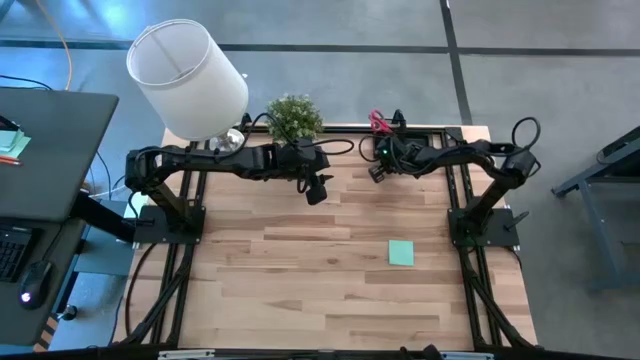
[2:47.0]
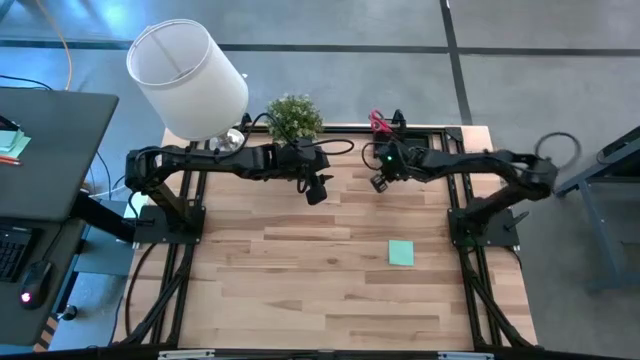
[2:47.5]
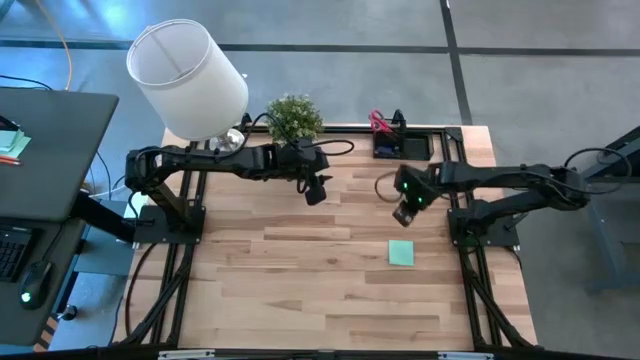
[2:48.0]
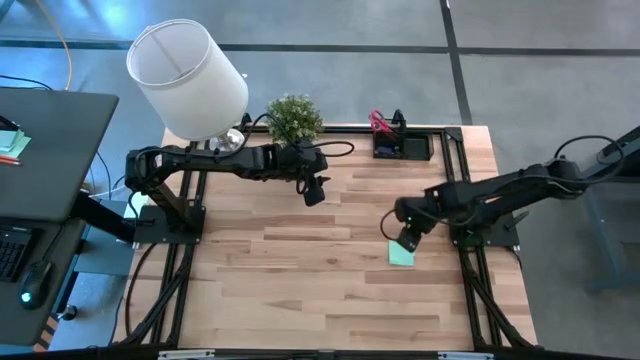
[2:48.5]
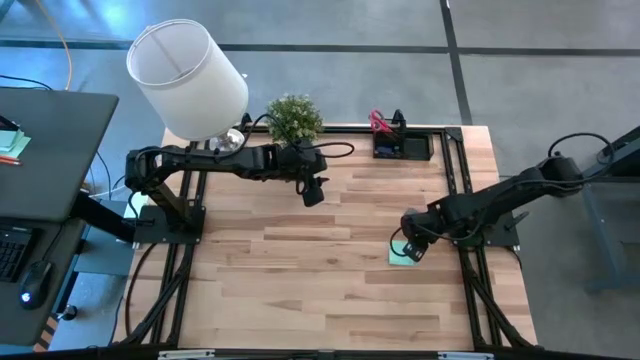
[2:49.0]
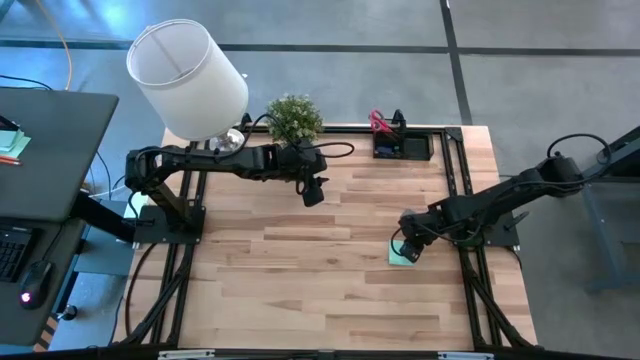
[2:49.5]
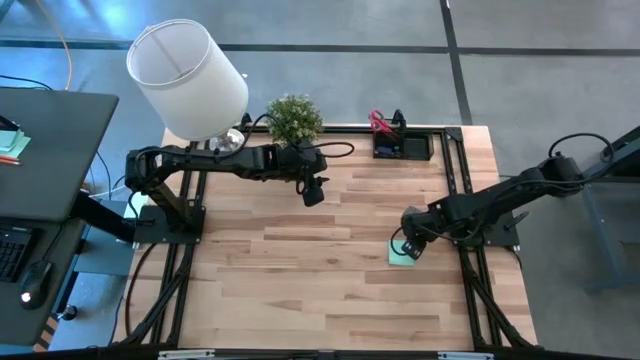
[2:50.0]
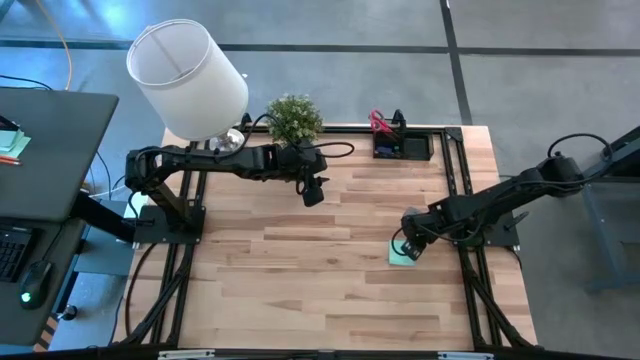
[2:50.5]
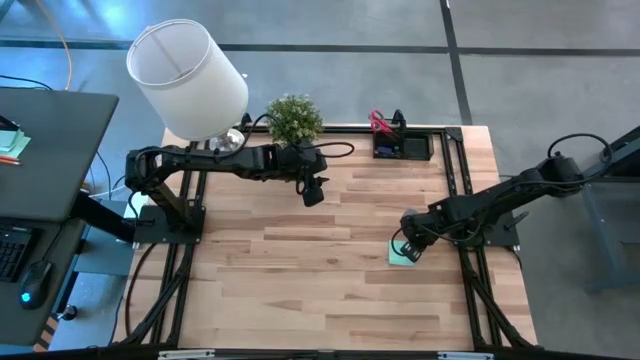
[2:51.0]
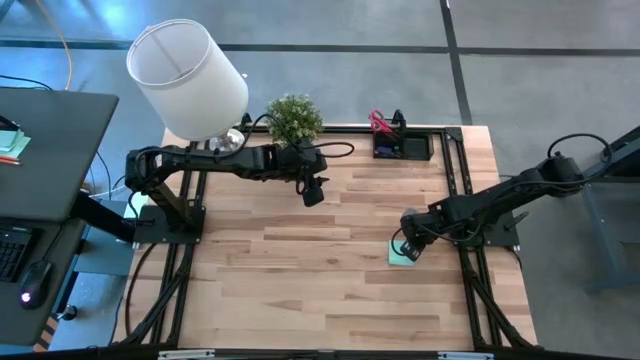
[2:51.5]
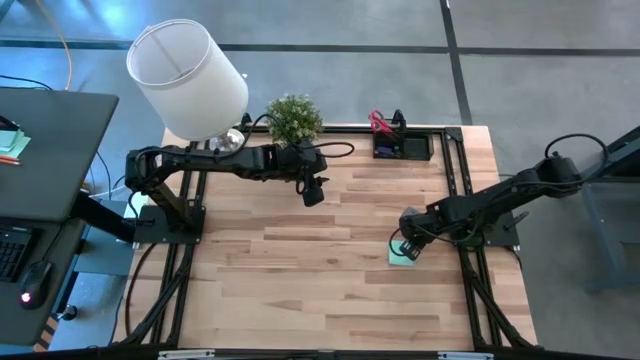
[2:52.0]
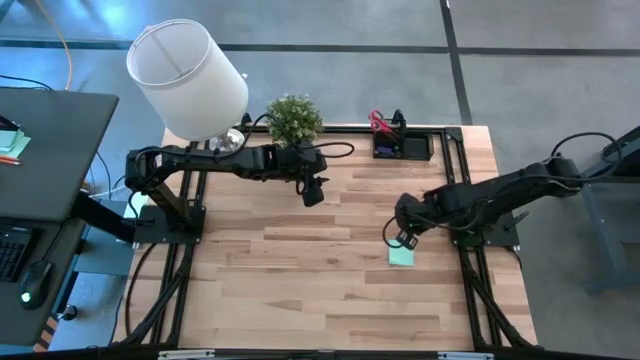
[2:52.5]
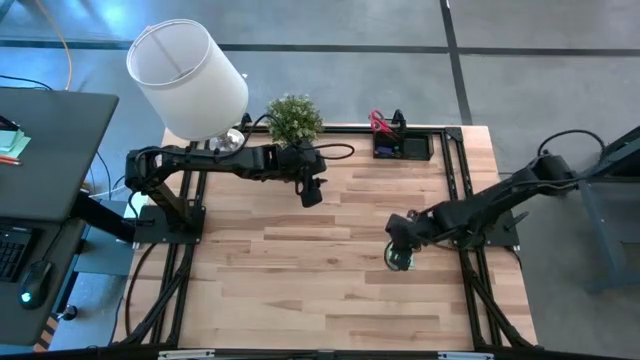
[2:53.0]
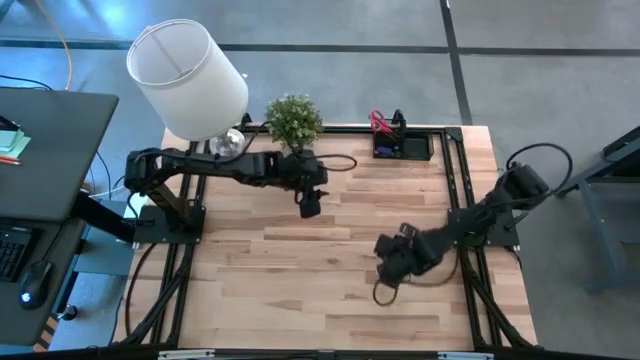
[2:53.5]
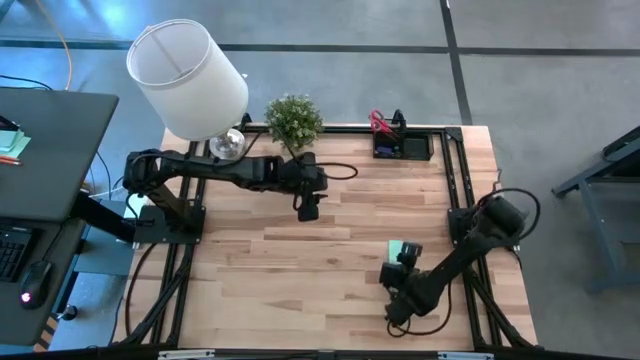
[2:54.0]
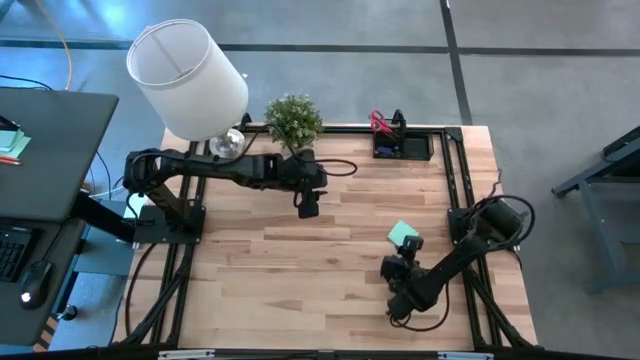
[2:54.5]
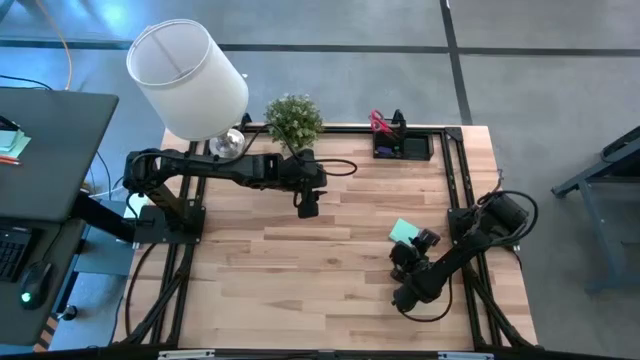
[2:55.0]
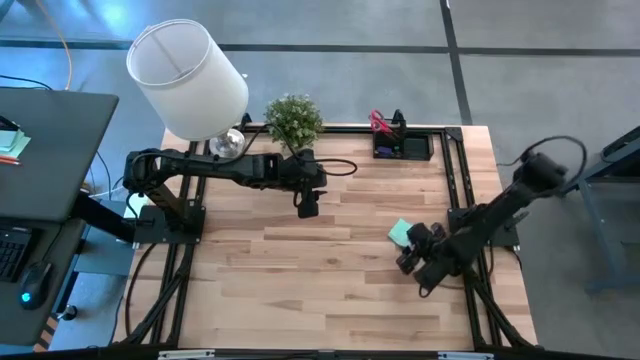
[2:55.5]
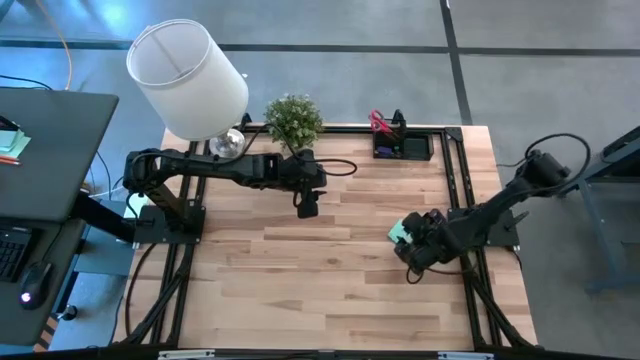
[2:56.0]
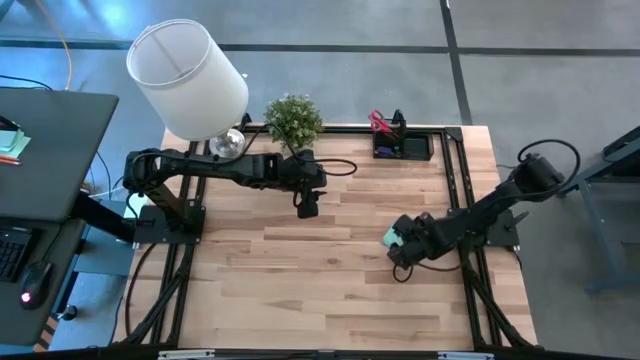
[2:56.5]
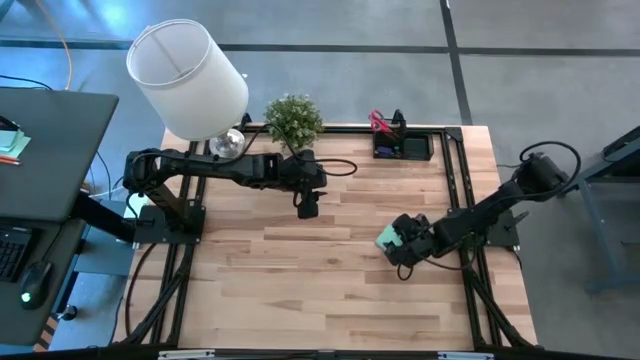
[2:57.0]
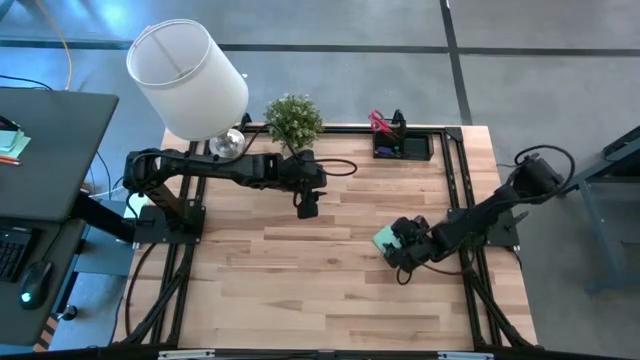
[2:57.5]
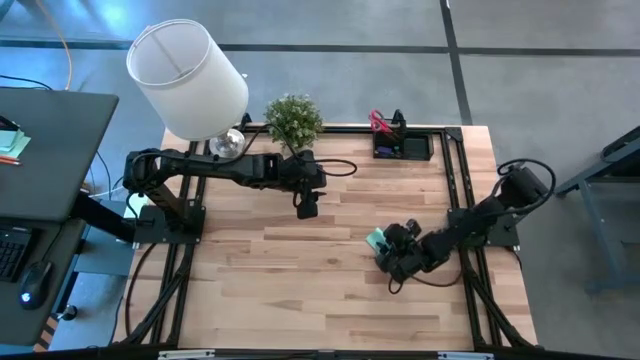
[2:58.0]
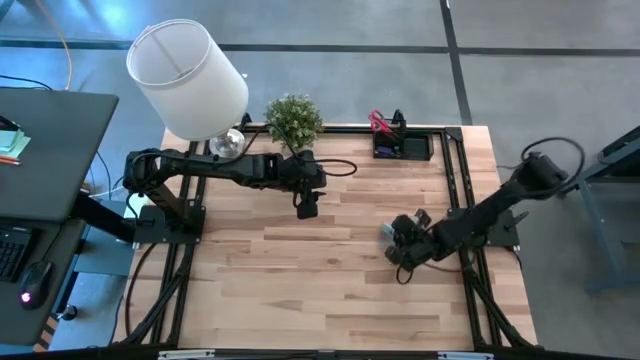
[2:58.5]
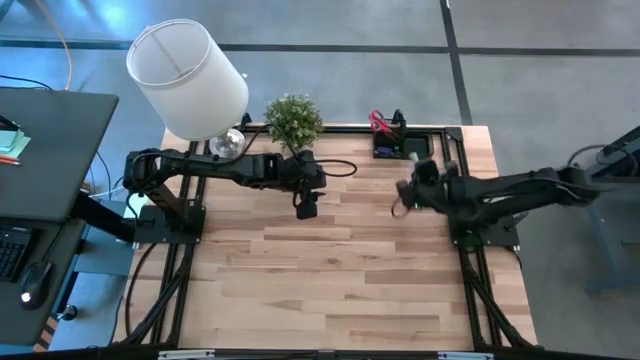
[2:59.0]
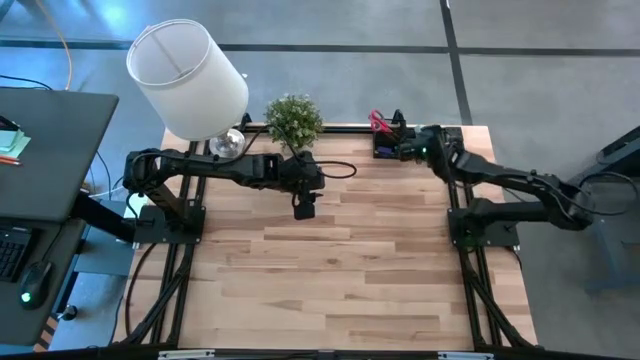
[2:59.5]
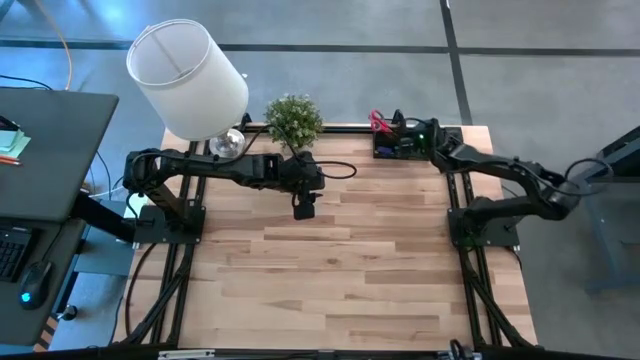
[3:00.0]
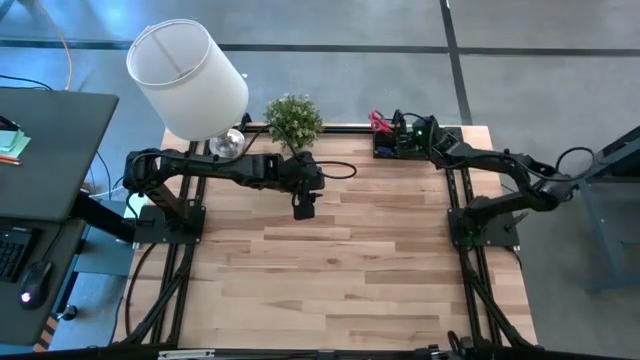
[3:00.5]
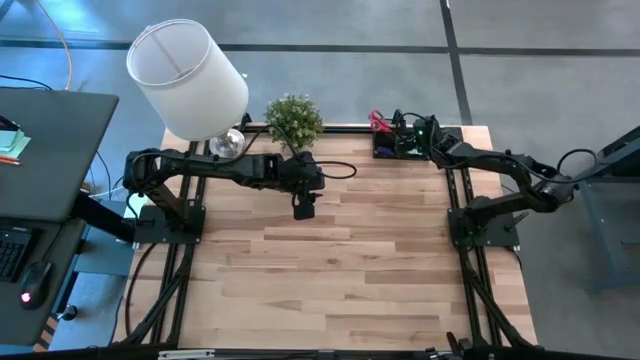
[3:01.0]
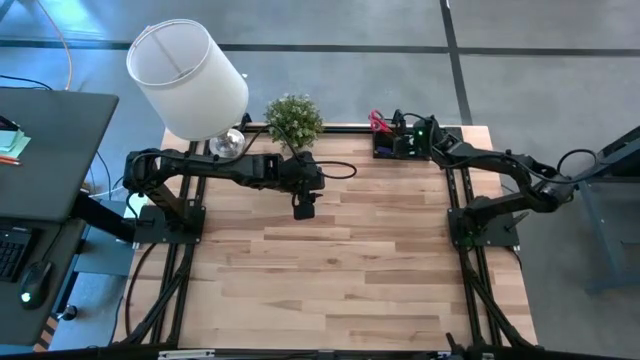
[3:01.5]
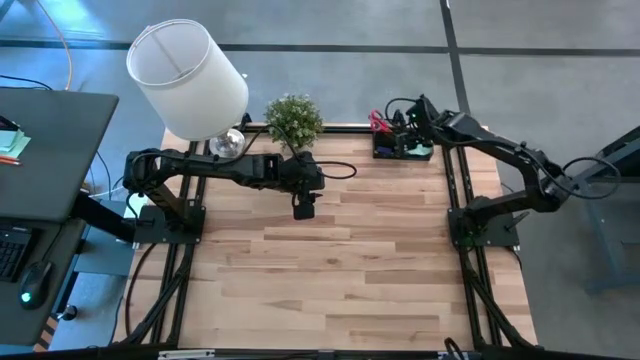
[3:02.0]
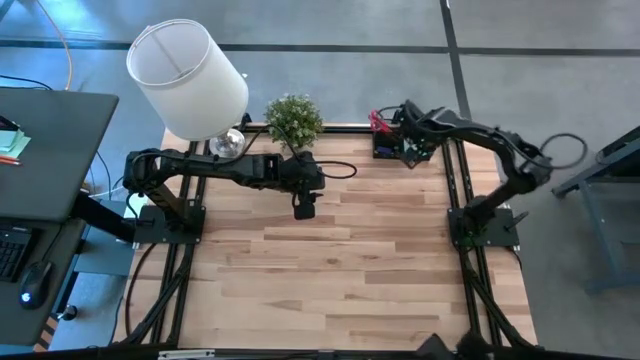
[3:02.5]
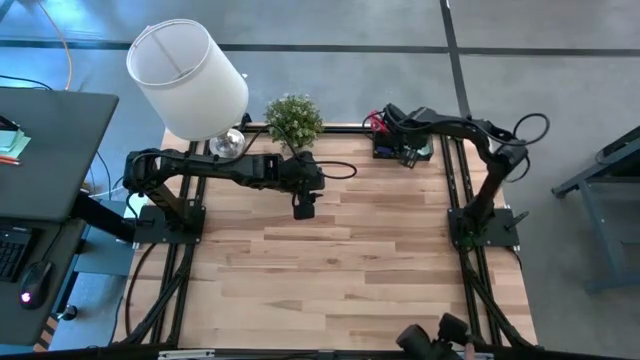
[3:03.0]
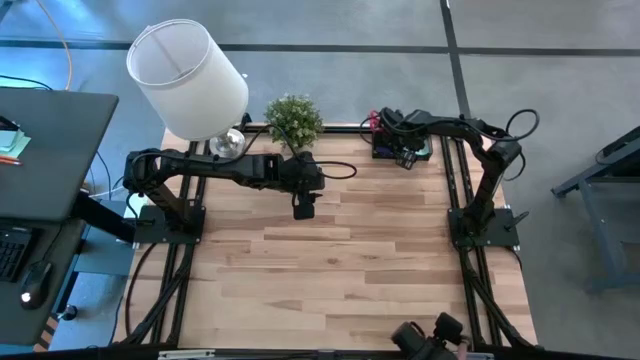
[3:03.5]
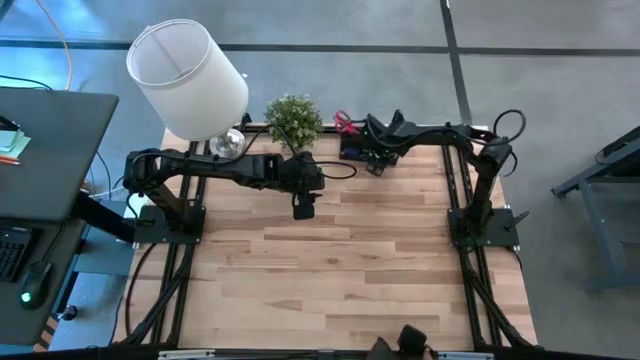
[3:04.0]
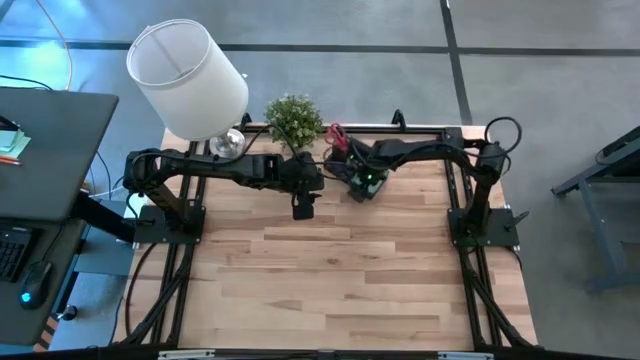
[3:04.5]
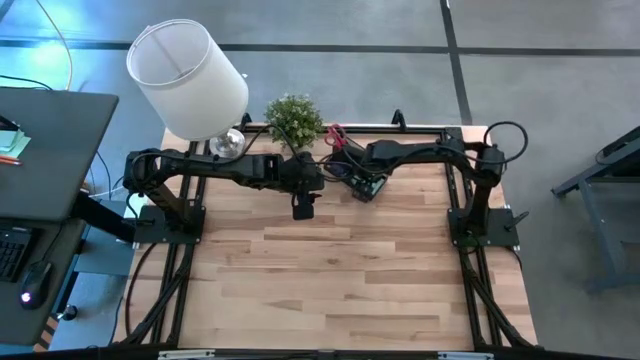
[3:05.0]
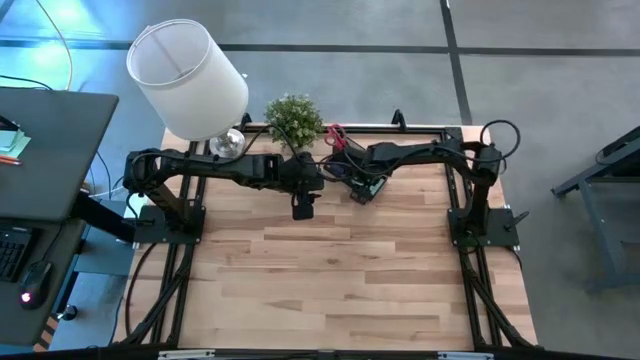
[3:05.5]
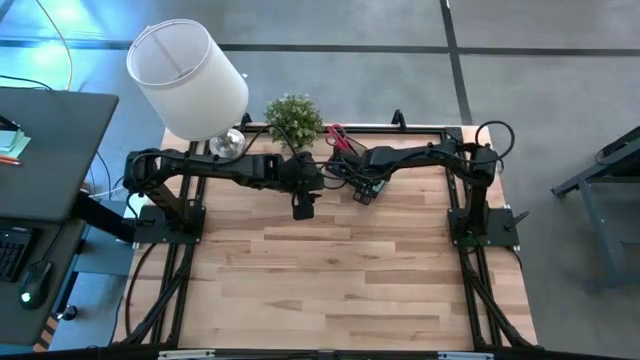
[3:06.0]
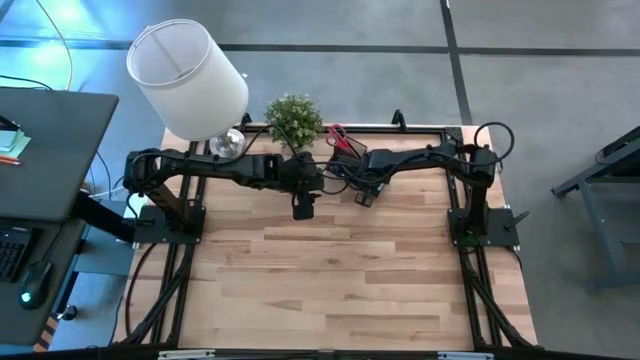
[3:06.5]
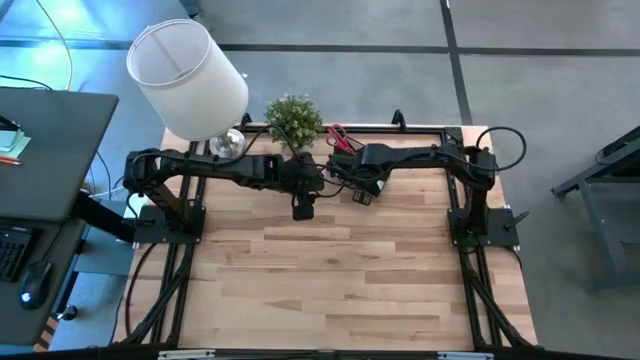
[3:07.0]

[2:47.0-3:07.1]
Task: Pick and place office supplies into organizer
Put the blue sticky notes in the black desk organizer
